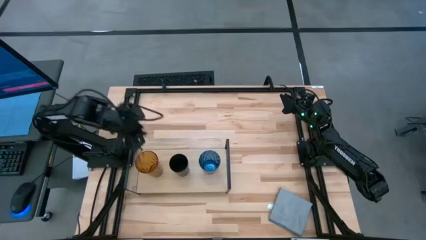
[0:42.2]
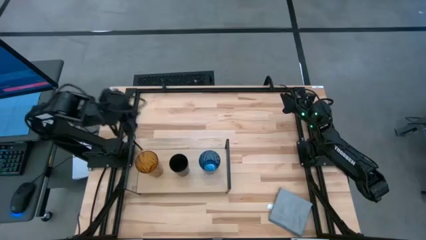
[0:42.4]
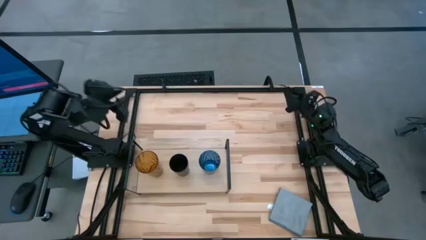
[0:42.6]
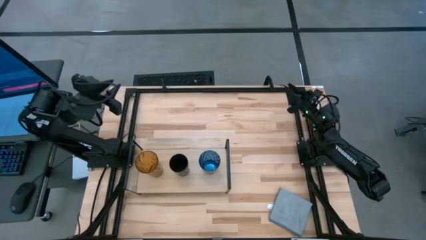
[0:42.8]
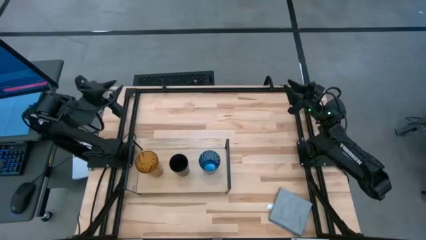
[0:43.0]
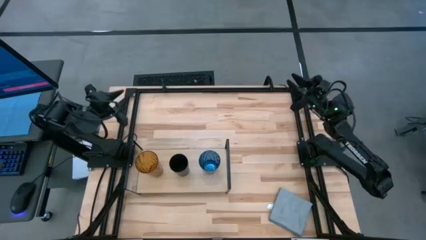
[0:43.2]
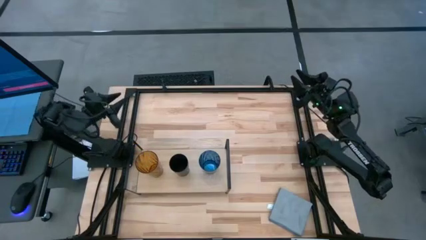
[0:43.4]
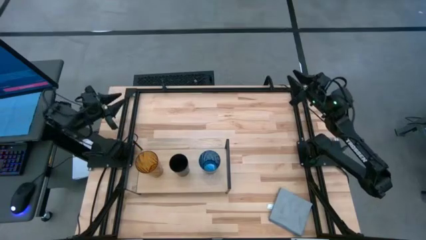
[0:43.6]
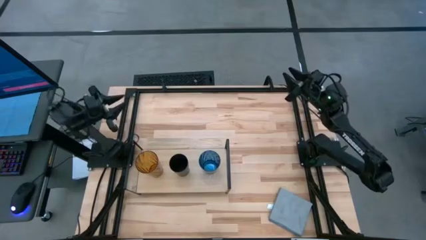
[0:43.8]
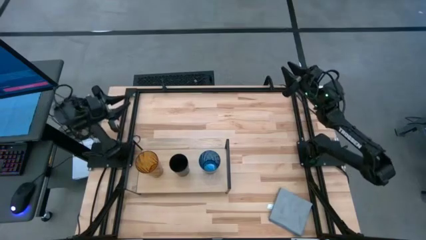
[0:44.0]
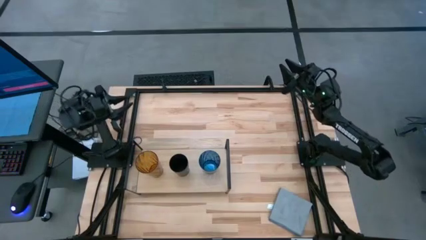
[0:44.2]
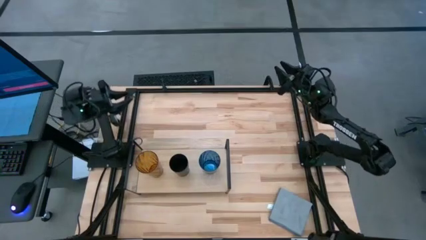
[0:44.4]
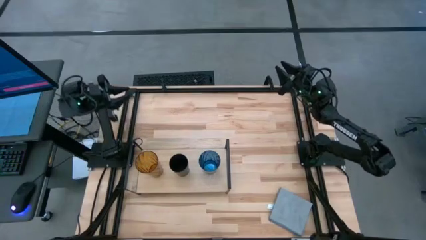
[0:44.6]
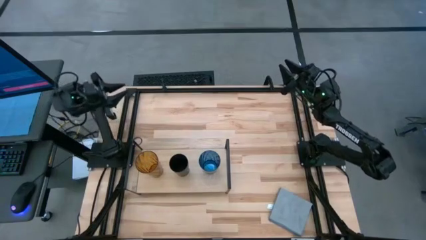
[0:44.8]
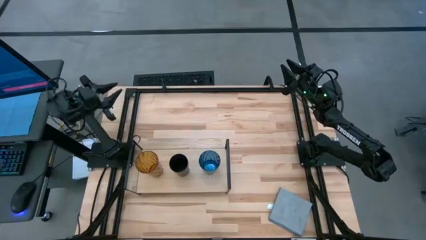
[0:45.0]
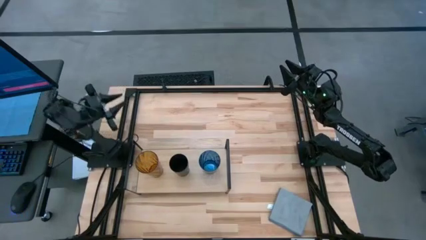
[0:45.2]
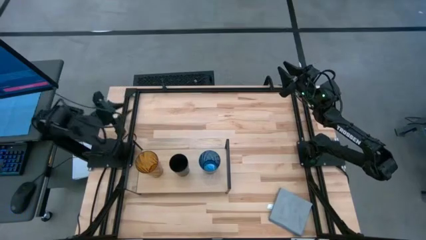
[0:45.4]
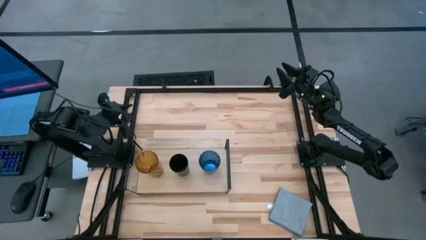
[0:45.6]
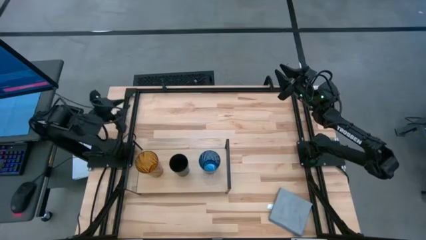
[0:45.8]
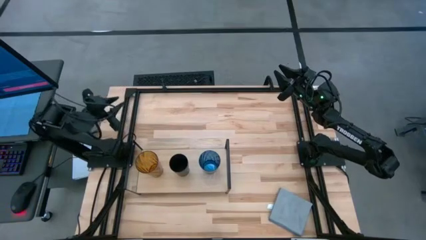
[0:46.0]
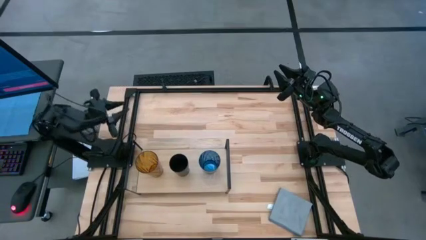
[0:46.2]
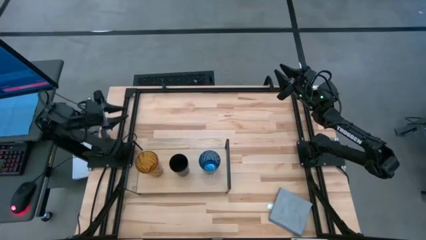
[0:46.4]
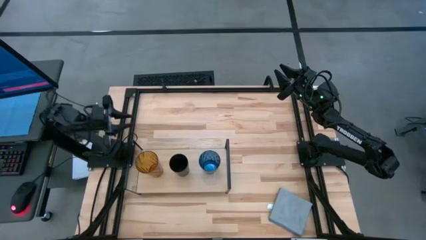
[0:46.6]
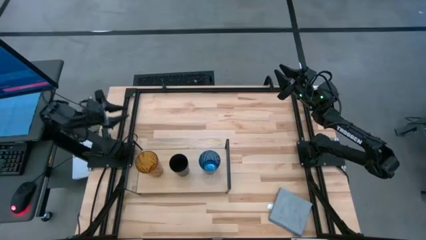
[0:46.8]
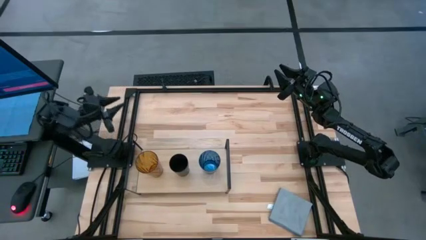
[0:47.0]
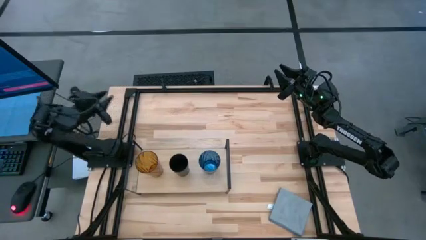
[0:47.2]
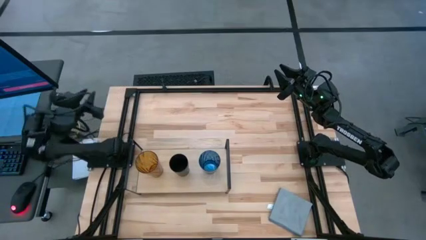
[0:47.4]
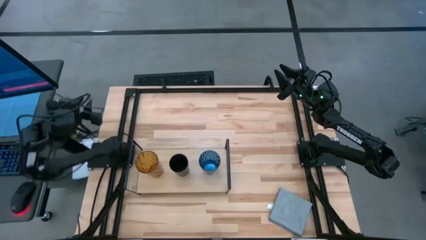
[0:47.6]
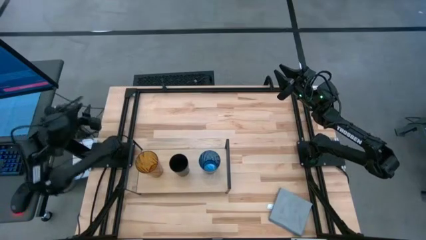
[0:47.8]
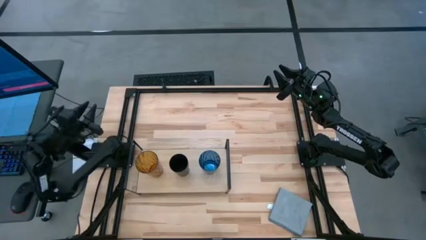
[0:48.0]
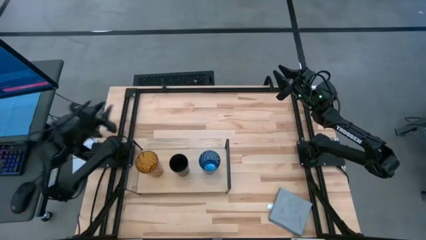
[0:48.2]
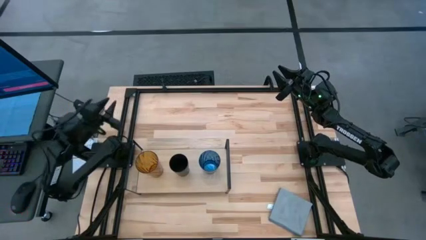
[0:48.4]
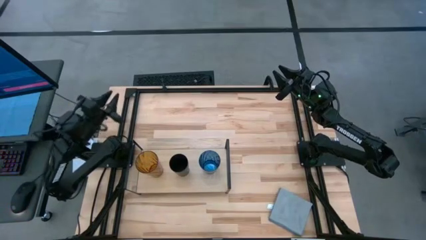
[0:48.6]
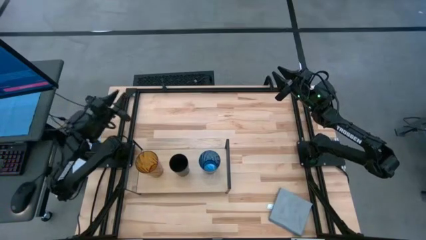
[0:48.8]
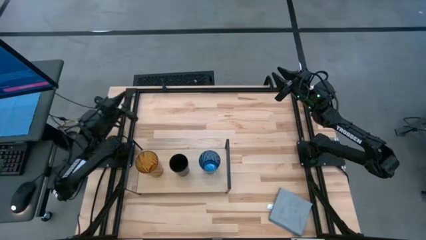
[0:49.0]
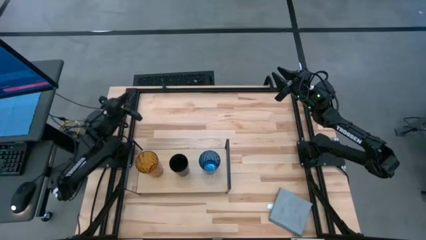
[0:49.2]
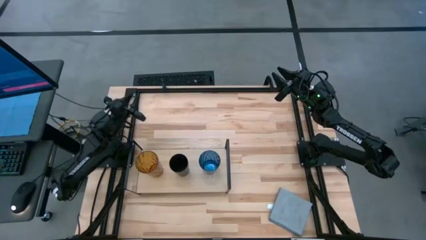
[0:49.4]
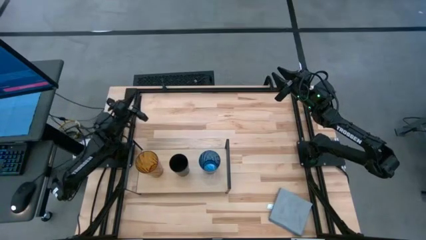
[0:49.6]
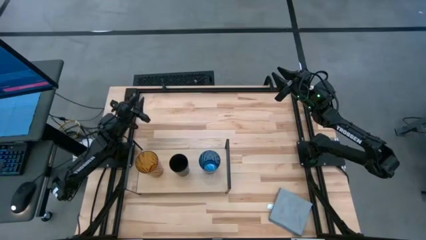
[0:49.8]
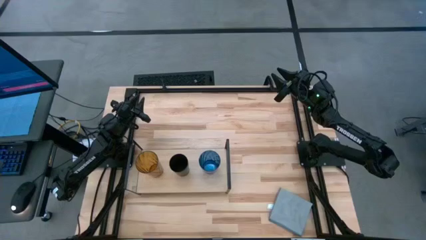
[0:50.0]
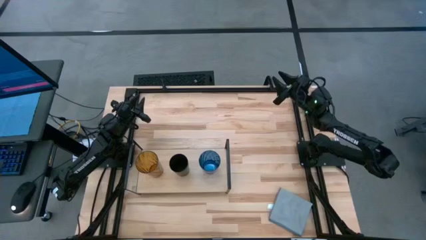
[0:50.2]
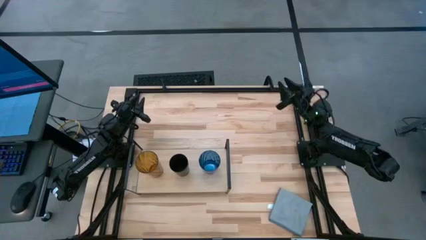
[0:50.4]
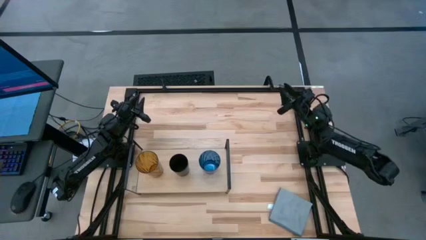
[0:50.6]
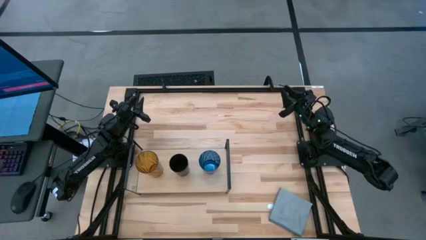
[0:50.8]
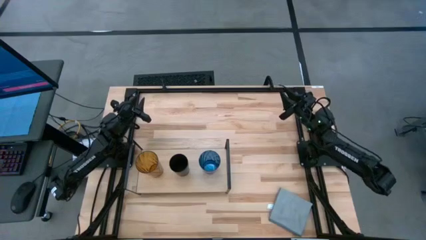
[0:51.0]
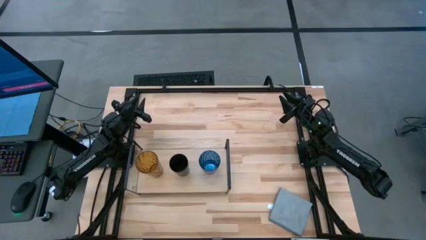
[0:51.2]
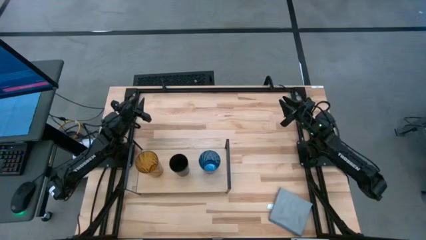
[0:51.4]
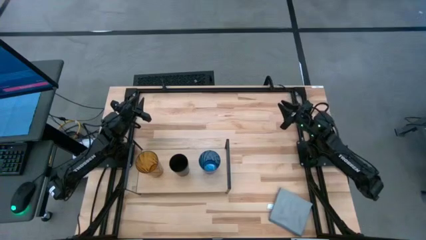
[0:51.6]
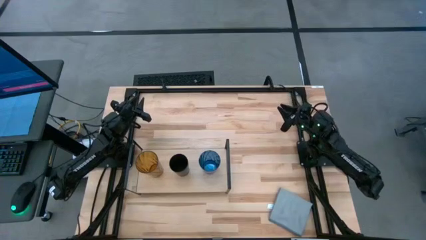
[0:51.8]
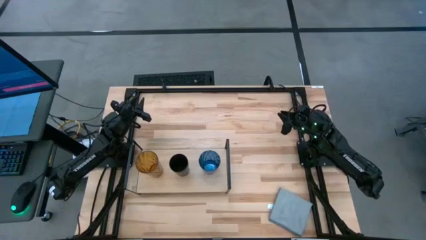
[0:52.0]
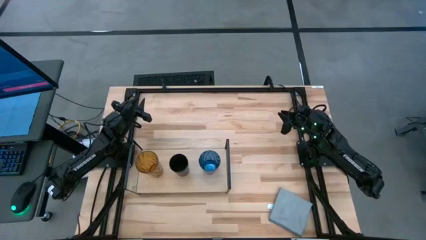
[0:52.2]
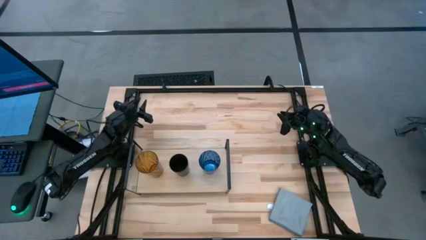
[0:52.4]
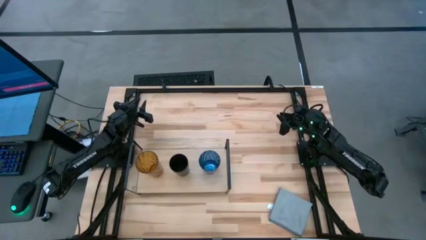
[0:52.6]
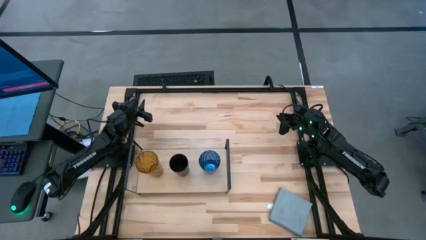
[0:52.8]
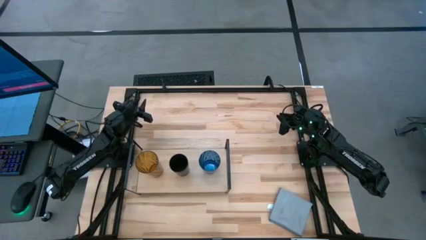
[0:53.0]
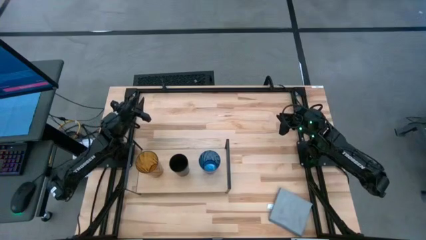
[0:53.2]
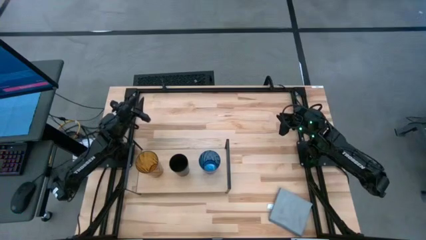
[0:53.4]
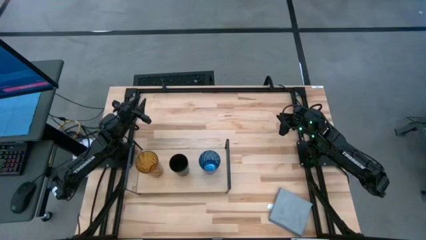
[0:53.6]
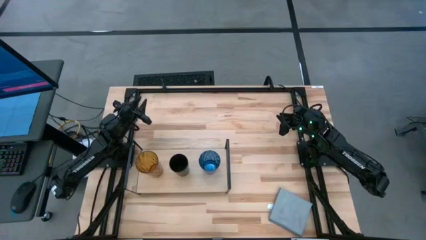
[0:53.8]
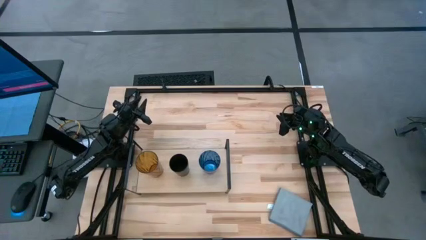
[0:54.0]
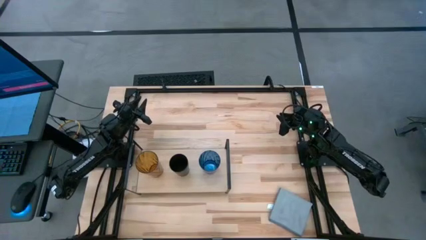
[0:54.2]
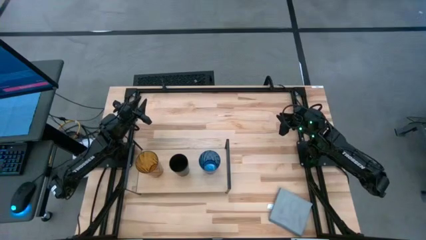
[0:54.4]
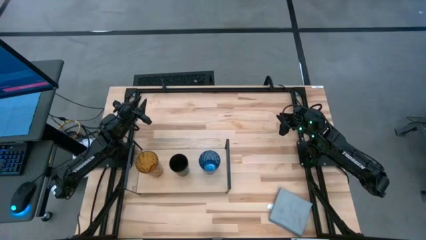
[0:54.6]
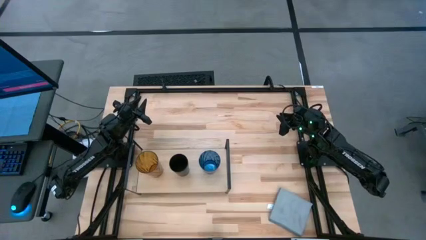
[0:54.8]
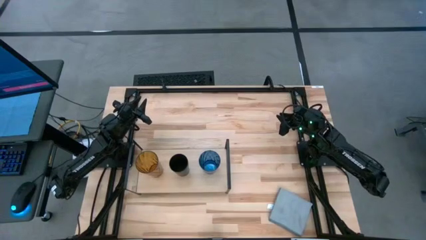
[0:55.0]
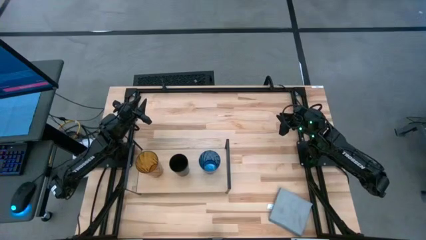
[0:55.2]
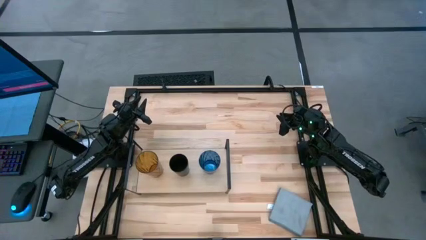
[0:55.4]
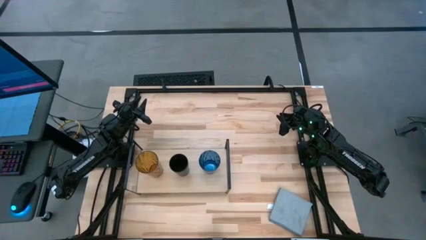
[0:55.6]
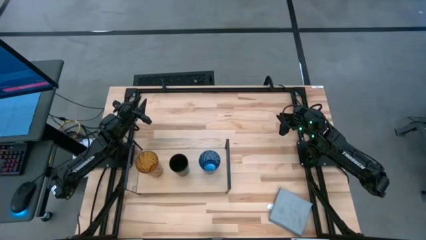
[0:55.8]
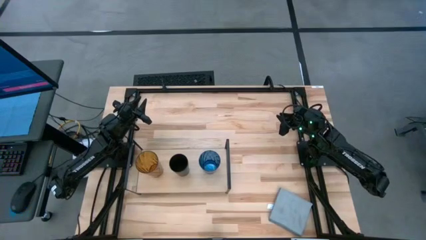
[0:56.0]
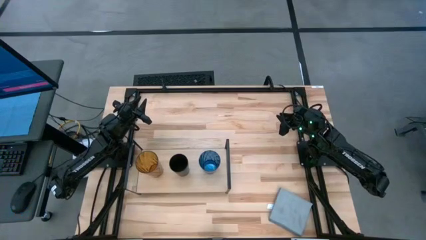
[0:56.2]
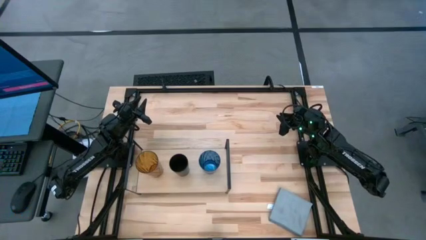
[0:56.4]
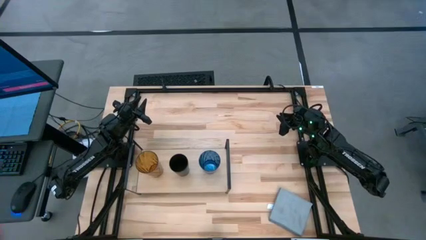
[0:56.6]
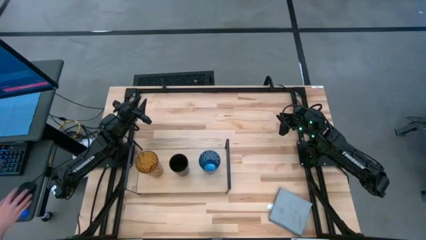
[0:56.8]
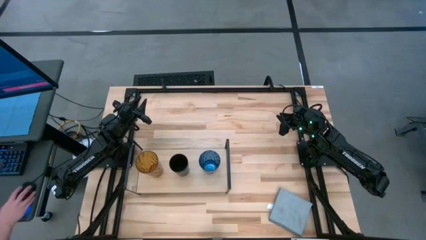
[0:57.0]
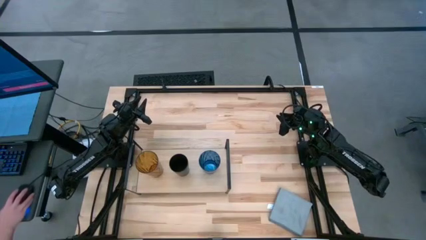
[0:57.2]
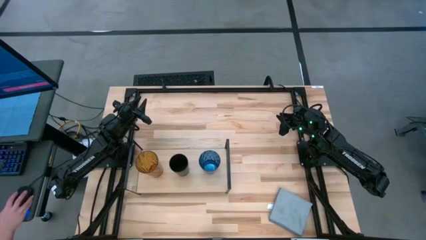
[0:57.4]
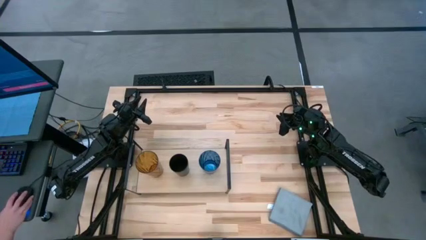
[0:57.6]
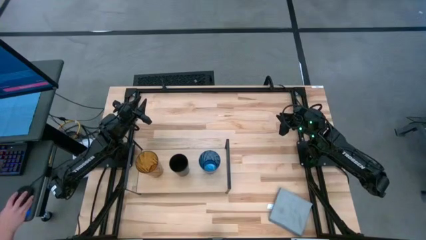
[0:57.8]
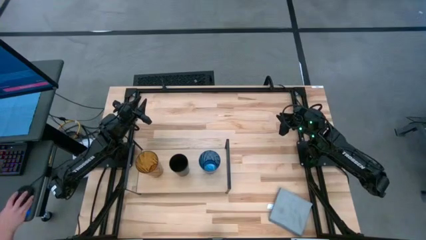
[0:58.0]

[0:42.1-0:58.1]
Task: Stack small to large cups/mugs on shelf
Return to Home Position
